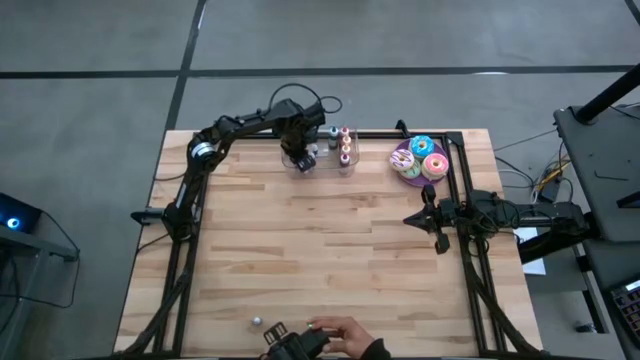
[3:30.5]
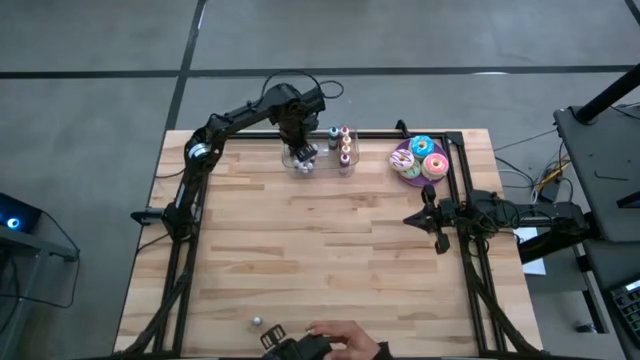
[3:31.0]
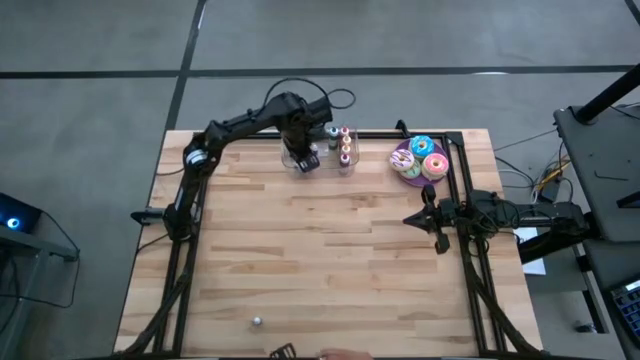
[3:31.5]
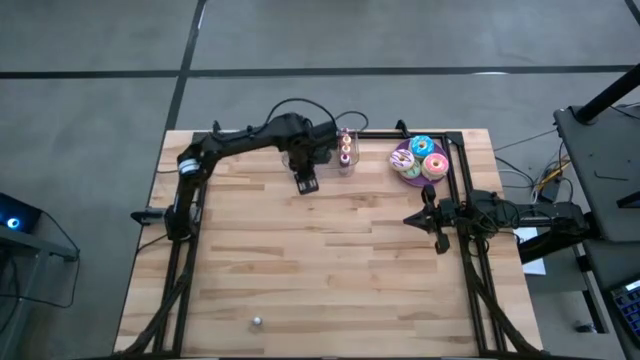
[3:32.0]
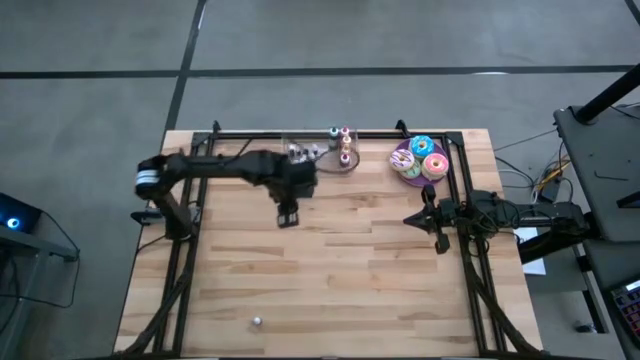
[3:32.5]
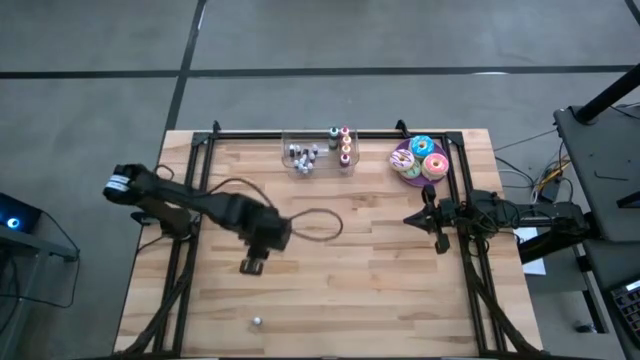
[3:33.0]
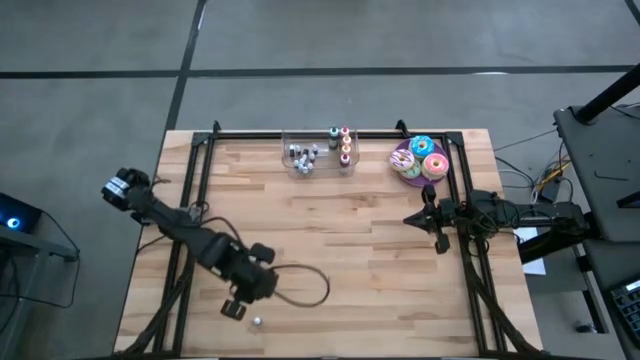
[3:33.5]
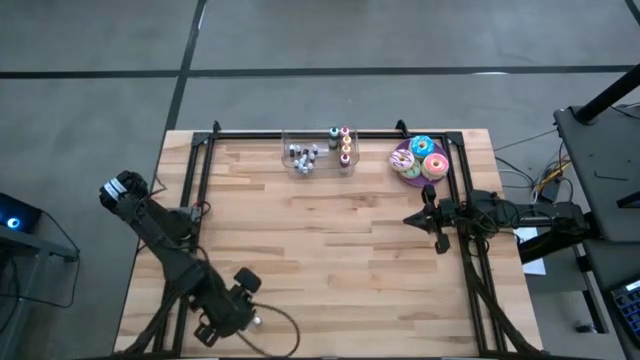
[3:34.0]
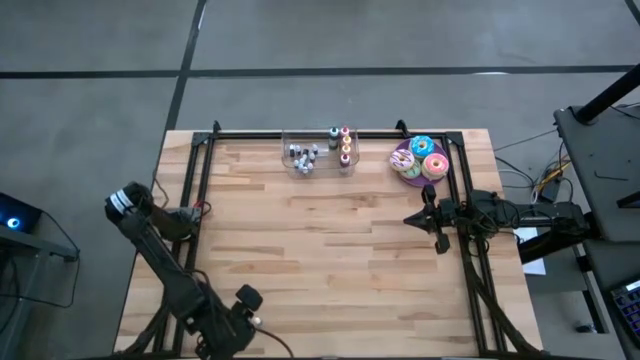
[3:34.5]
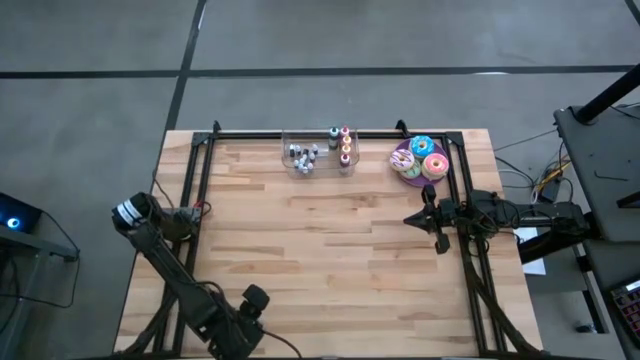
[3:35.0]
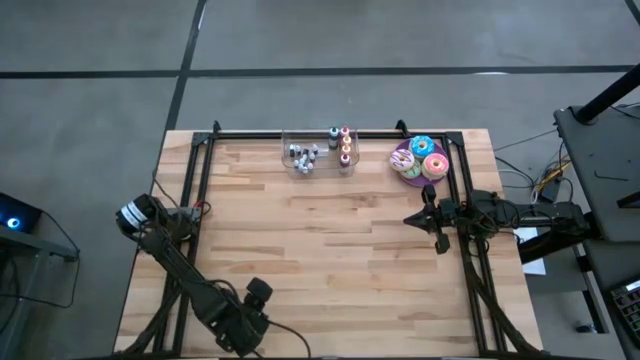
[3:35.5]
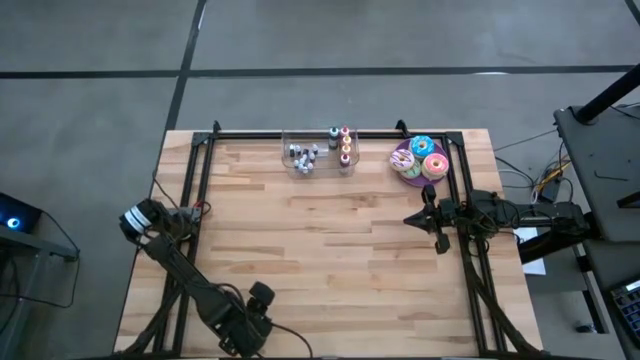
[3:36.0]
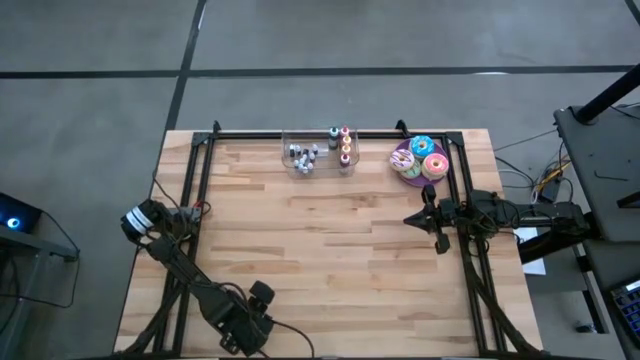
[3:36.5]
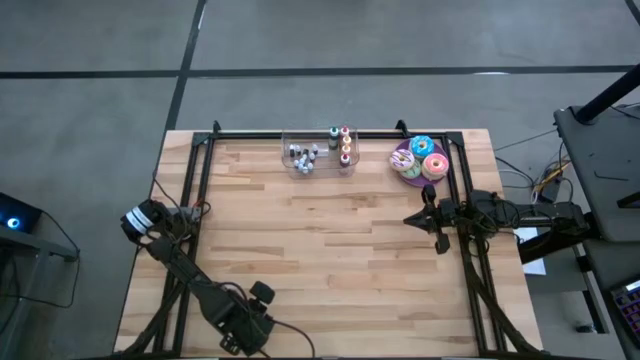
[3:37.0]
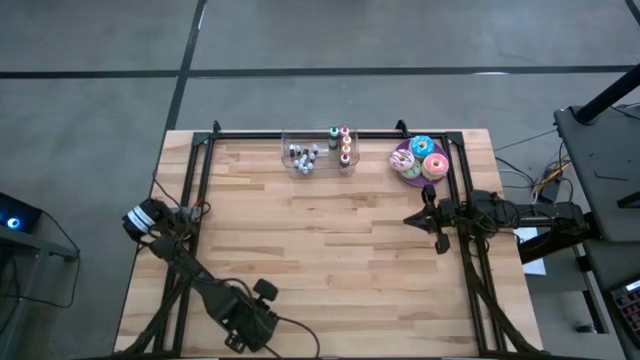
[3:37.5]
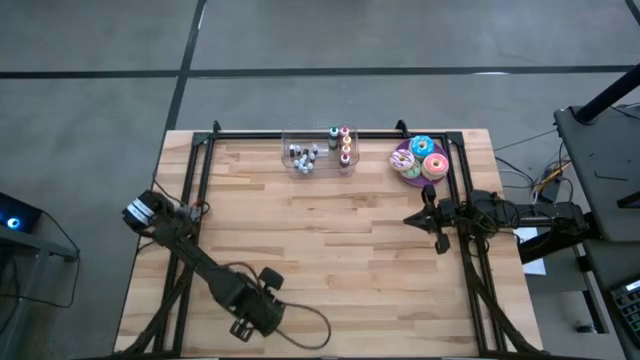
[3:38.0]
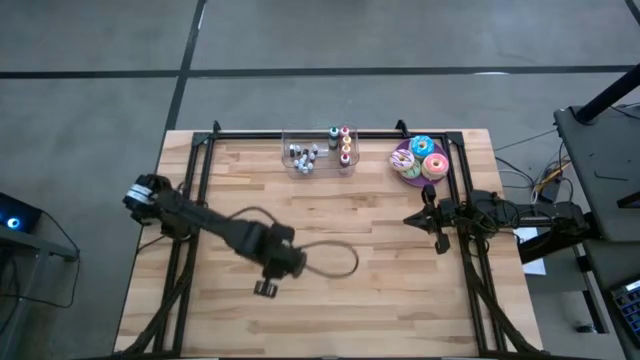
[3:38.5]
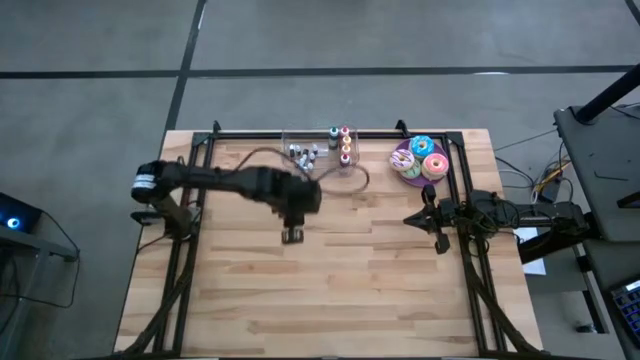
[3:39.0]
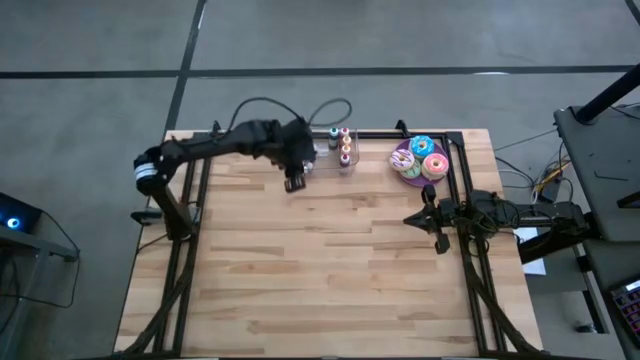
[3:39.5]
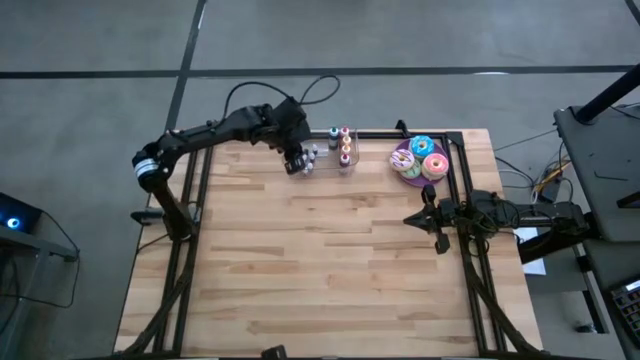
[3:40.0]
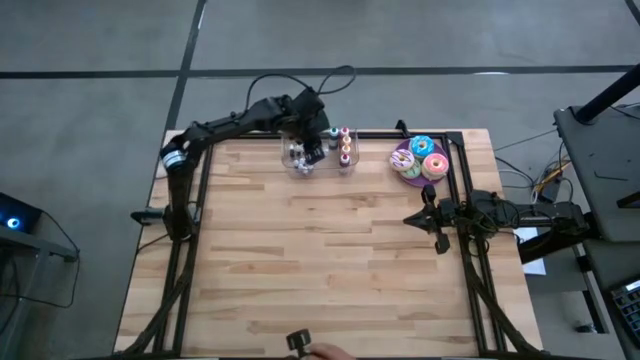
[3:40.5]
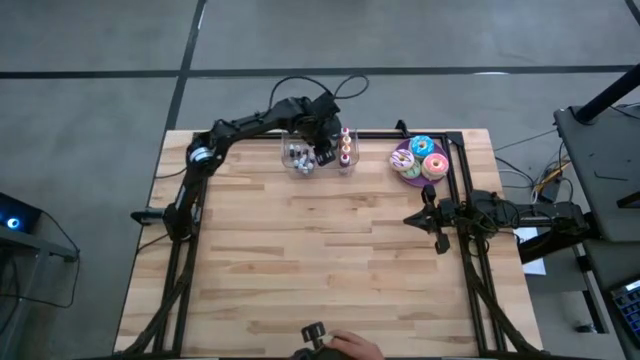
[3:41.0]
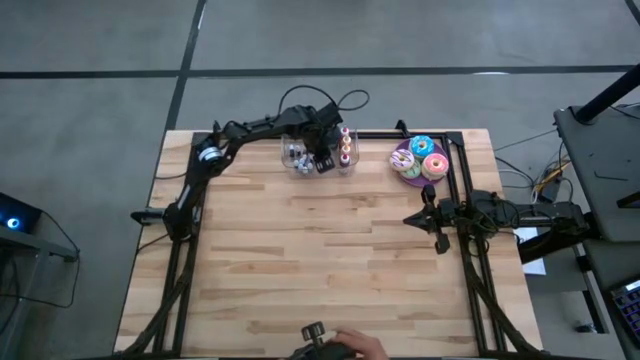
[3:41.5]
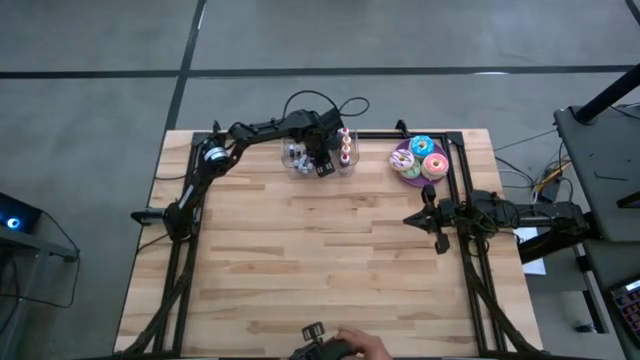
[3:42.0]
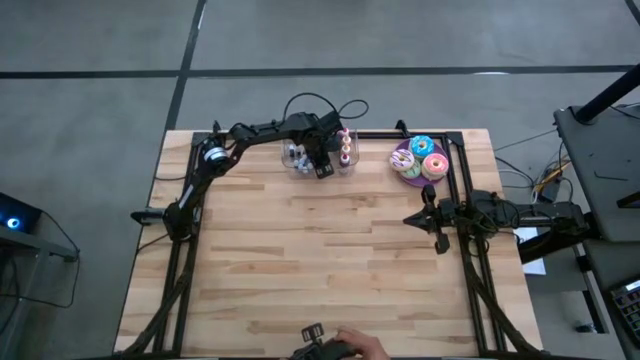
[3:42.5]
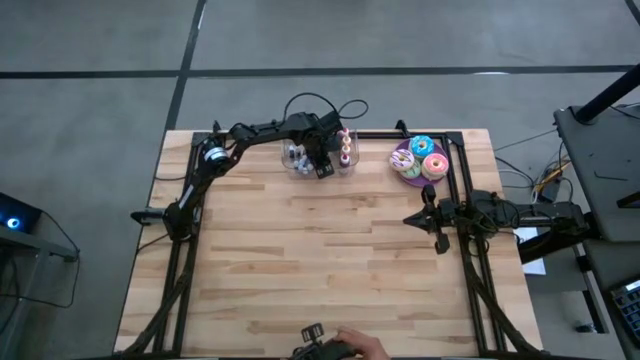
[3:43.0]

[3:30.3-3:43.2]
Task: Pick & Place food coloring
Put the small green food coloring bottle into the transparent bin

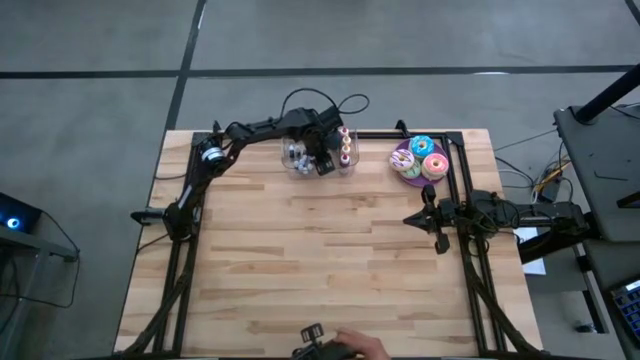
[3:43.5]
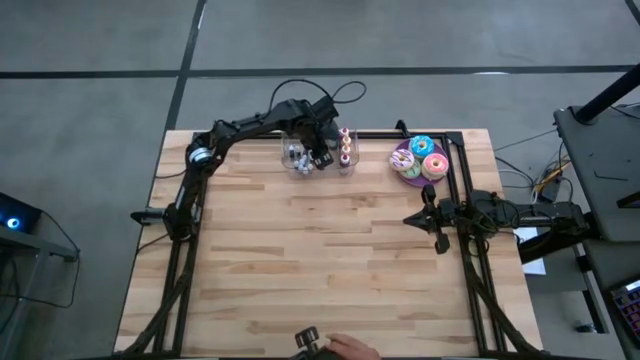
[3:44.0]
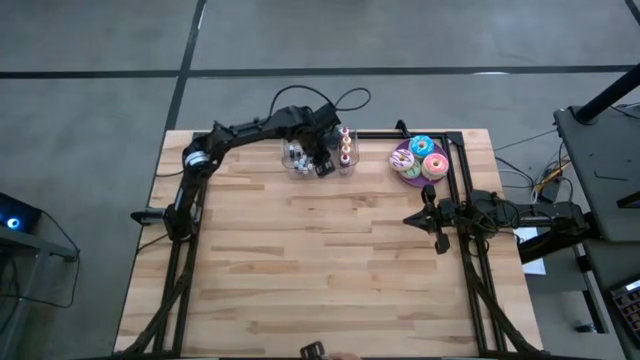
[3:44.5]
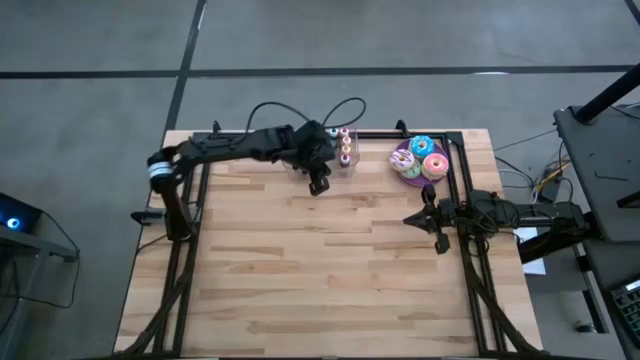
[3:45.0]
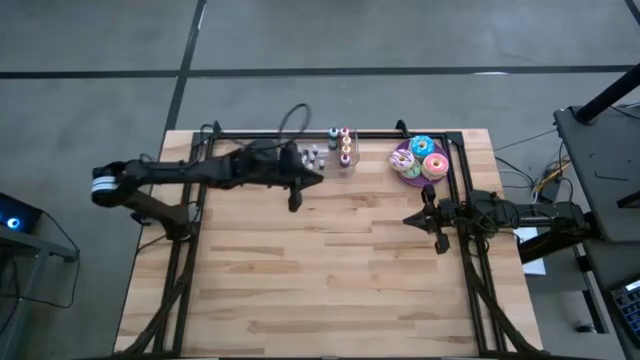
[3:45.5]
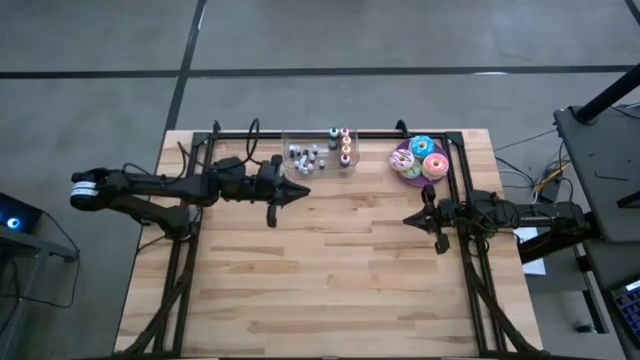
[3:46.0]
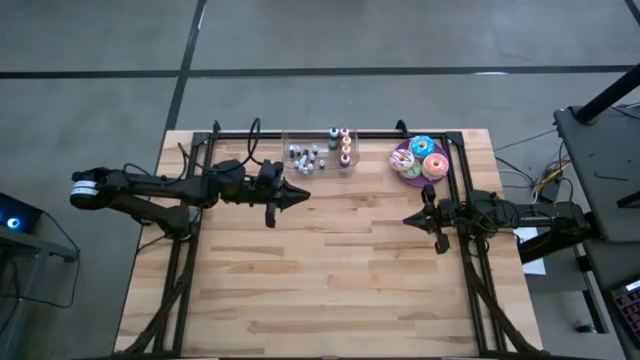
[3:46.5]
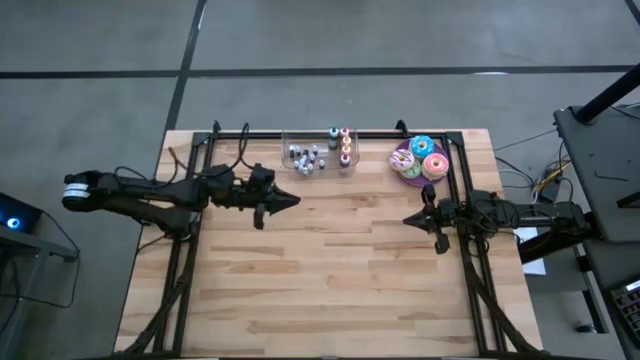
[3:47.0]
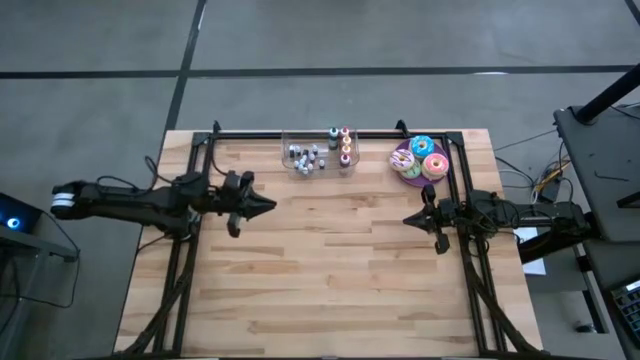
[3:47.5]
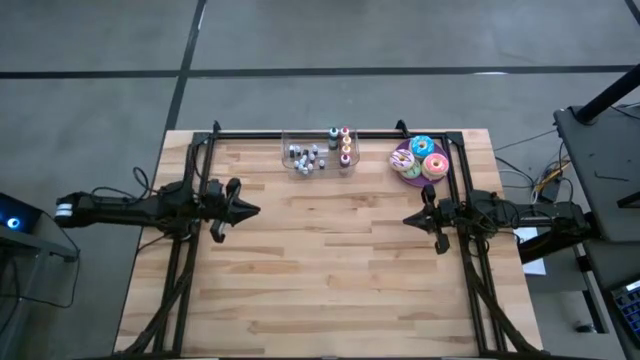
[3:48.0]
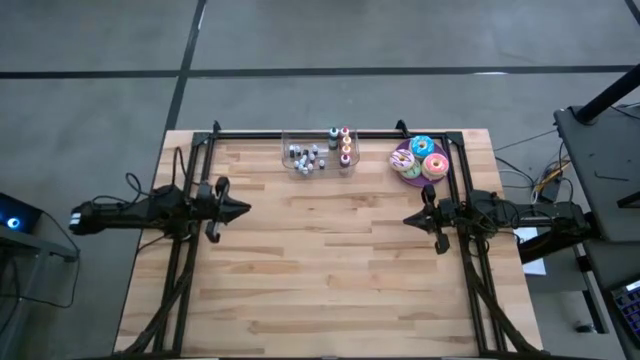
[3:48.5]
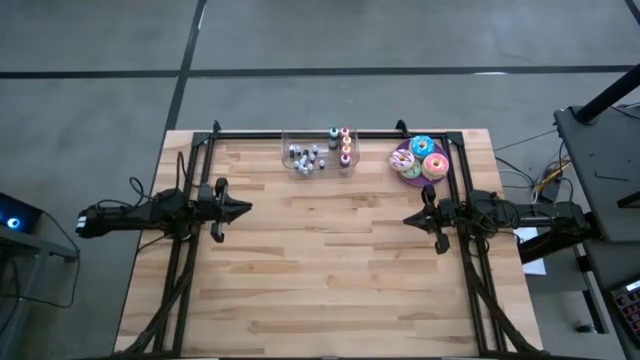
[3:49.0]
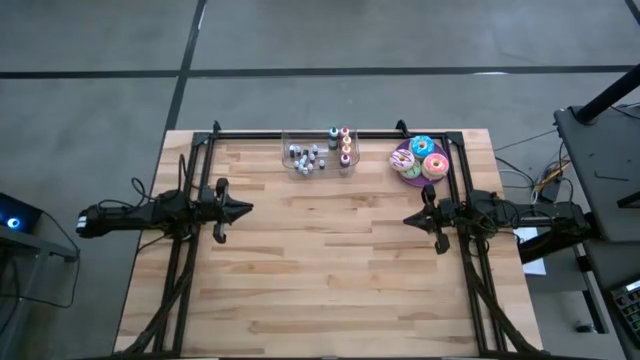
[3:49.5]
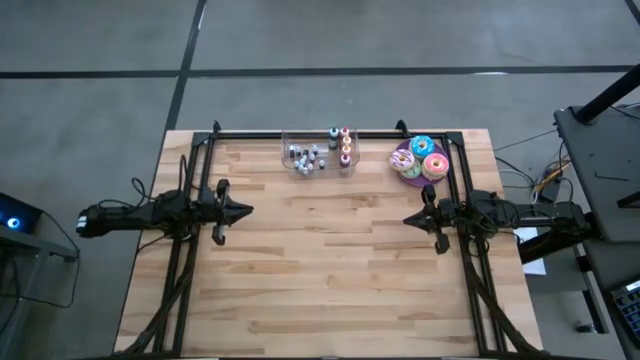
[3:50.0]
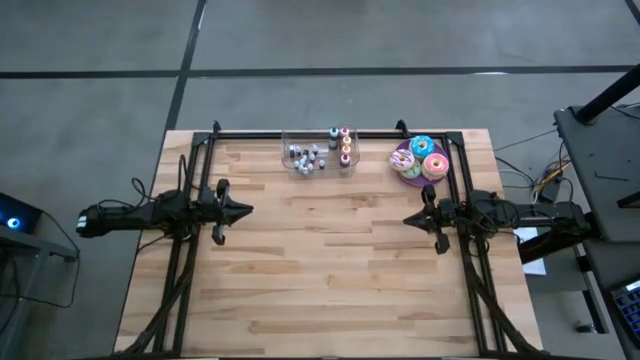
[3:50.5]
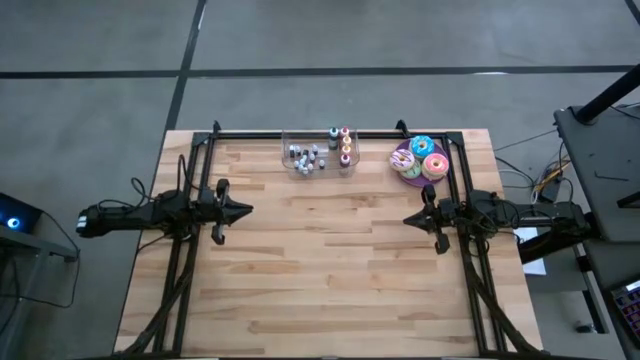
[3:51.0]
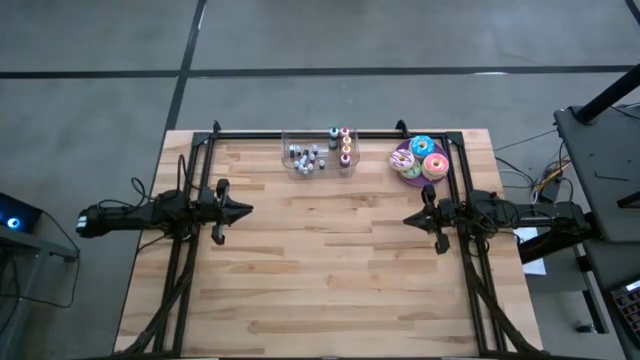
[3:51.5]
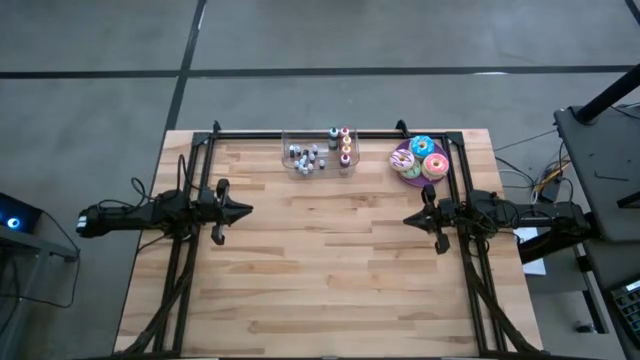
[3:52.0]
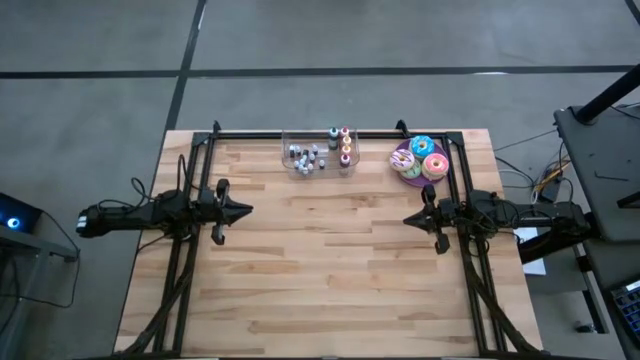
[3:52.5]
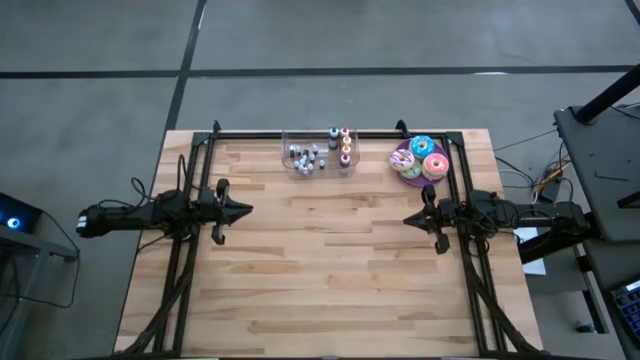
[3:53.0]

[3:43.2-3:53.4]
Return to Home Position
